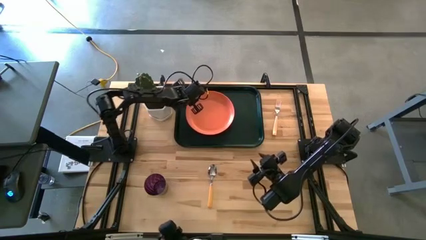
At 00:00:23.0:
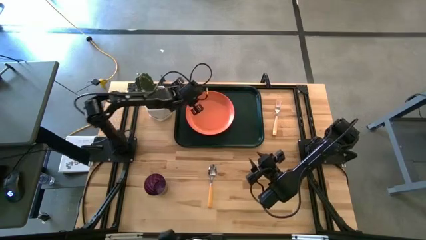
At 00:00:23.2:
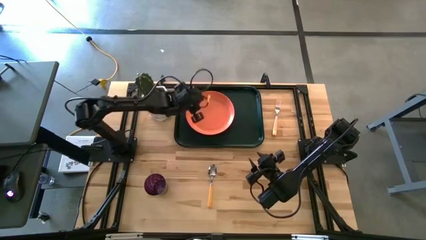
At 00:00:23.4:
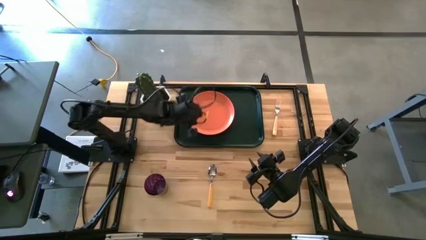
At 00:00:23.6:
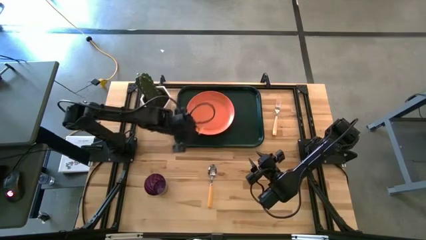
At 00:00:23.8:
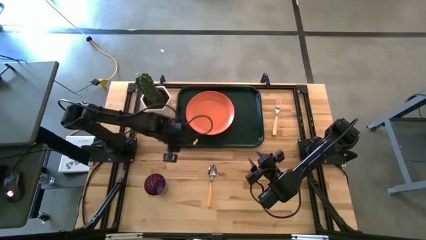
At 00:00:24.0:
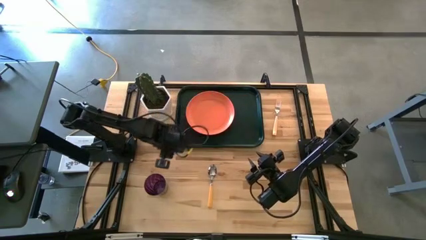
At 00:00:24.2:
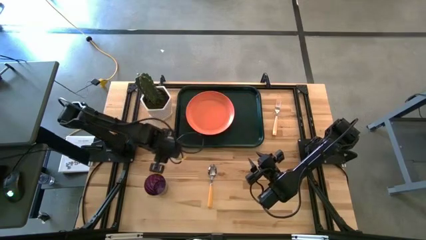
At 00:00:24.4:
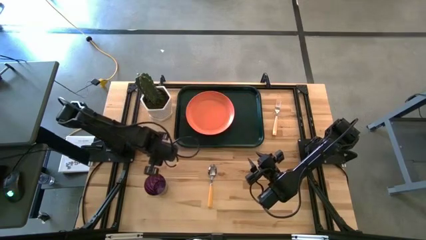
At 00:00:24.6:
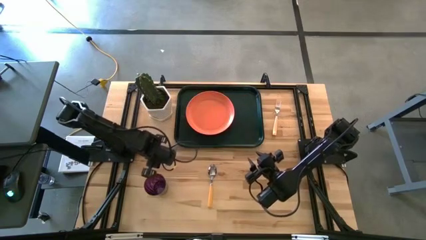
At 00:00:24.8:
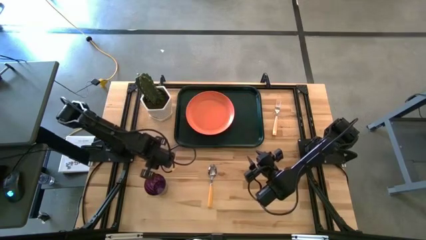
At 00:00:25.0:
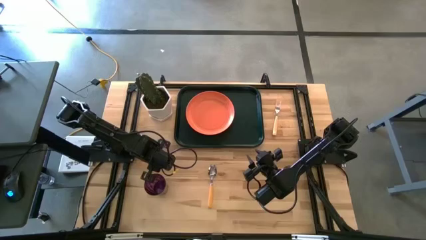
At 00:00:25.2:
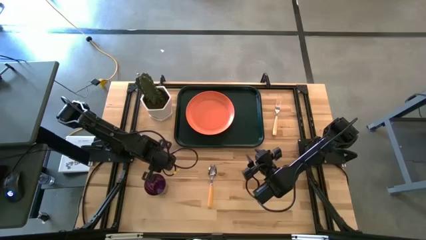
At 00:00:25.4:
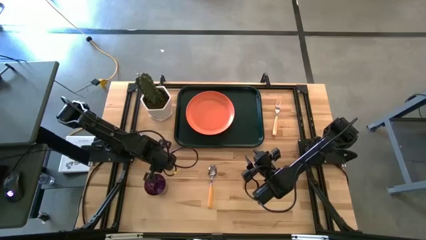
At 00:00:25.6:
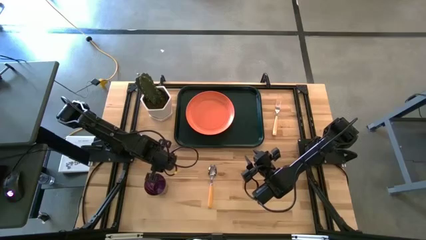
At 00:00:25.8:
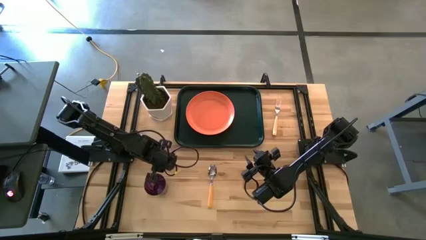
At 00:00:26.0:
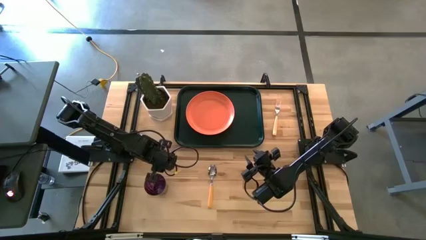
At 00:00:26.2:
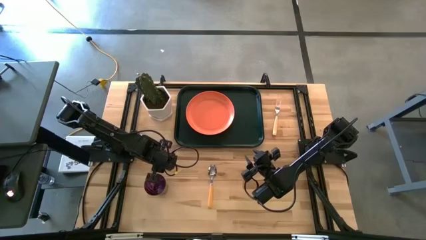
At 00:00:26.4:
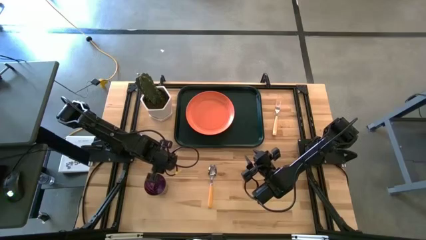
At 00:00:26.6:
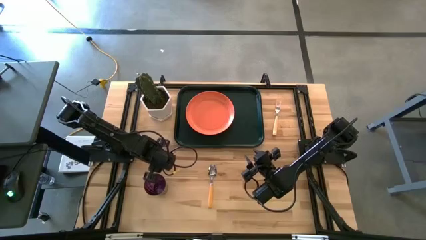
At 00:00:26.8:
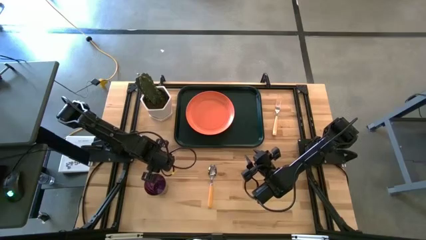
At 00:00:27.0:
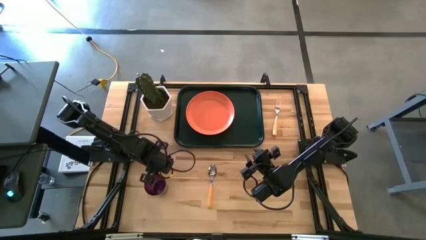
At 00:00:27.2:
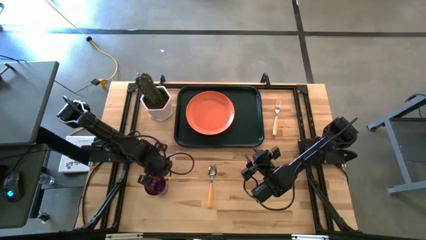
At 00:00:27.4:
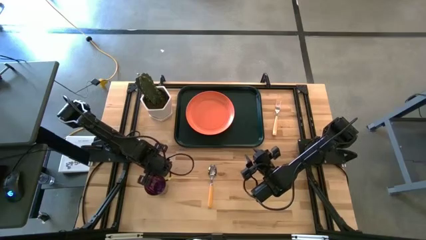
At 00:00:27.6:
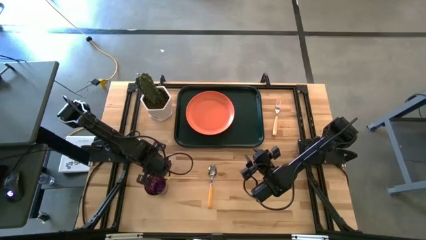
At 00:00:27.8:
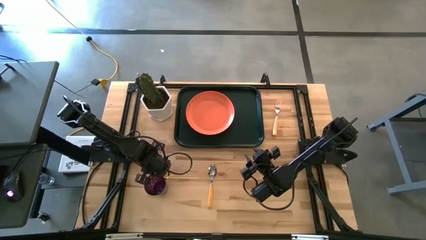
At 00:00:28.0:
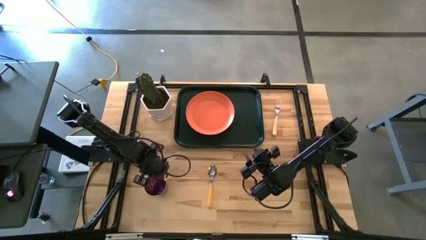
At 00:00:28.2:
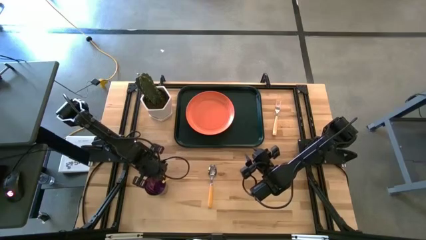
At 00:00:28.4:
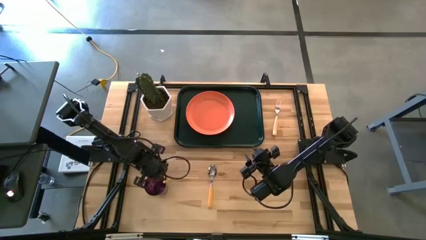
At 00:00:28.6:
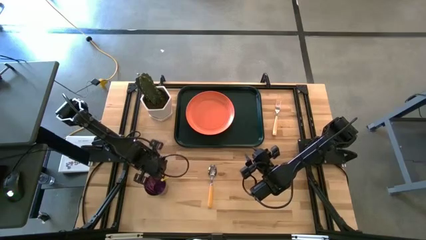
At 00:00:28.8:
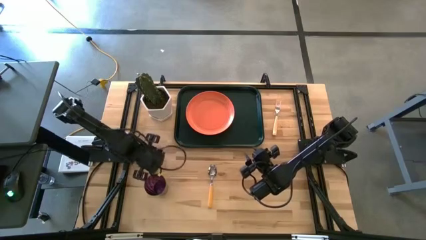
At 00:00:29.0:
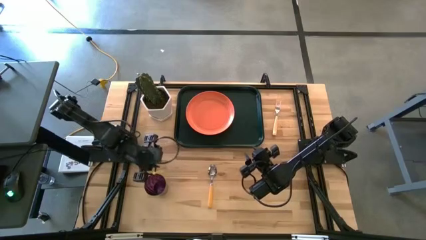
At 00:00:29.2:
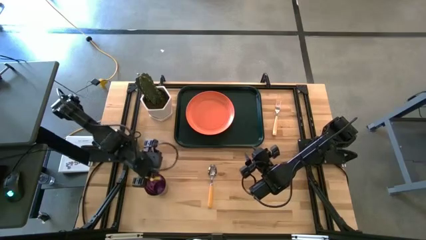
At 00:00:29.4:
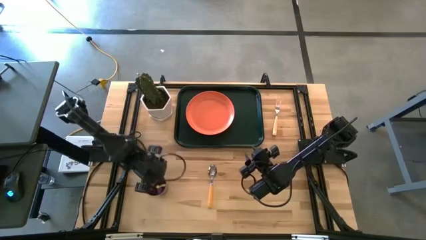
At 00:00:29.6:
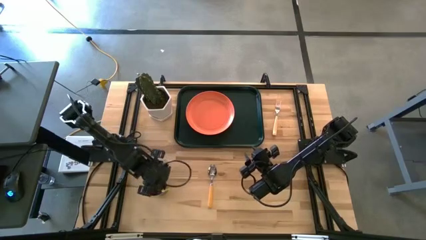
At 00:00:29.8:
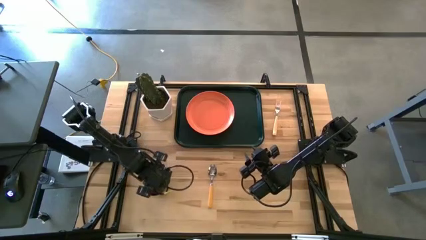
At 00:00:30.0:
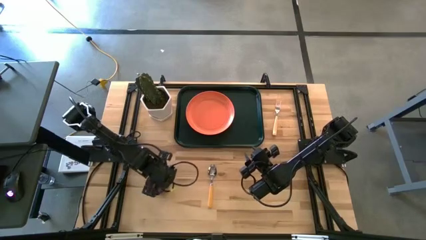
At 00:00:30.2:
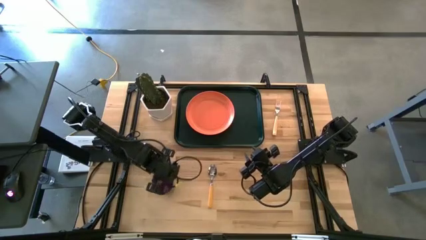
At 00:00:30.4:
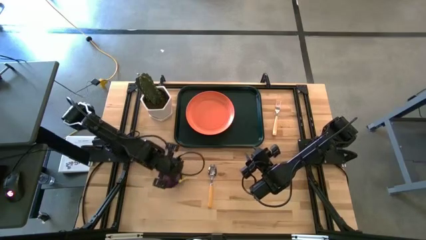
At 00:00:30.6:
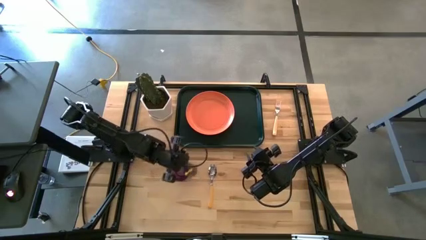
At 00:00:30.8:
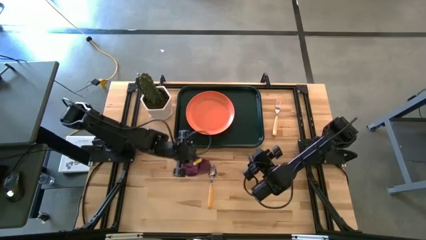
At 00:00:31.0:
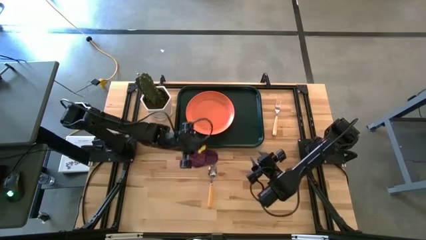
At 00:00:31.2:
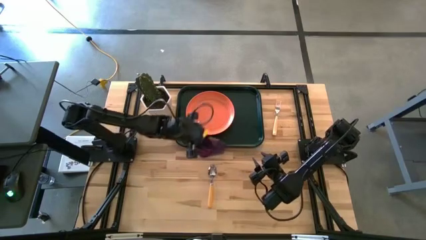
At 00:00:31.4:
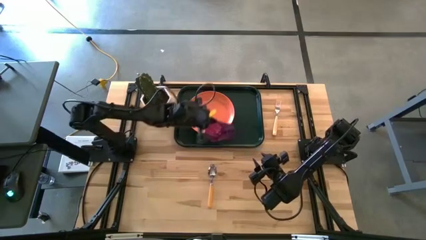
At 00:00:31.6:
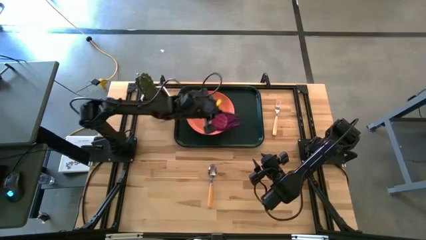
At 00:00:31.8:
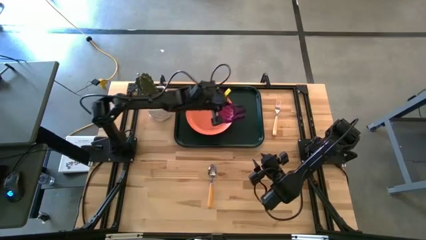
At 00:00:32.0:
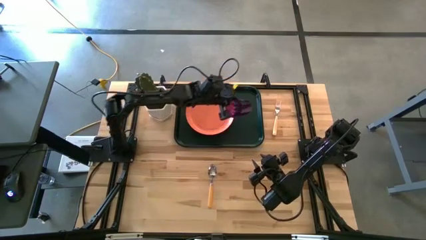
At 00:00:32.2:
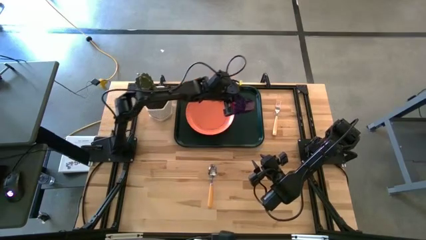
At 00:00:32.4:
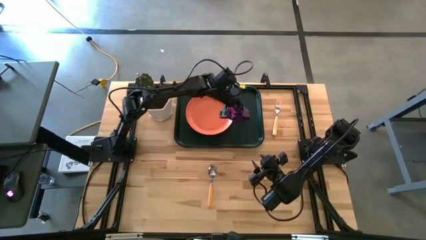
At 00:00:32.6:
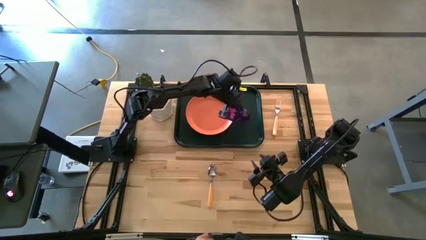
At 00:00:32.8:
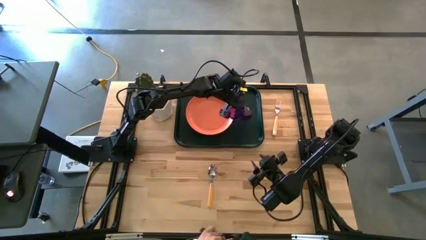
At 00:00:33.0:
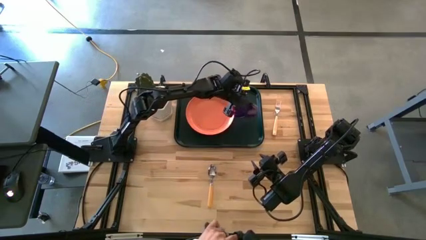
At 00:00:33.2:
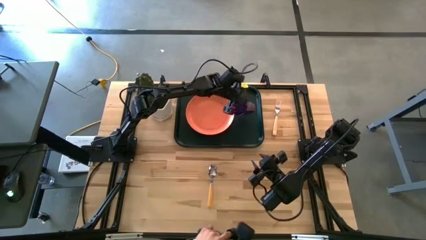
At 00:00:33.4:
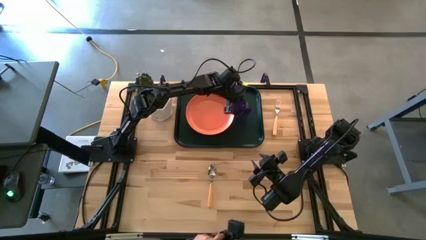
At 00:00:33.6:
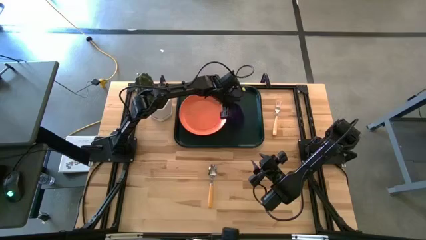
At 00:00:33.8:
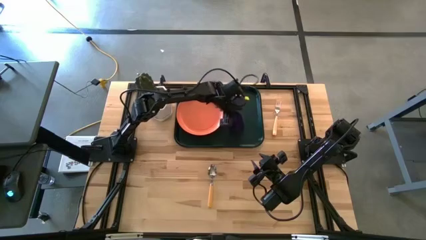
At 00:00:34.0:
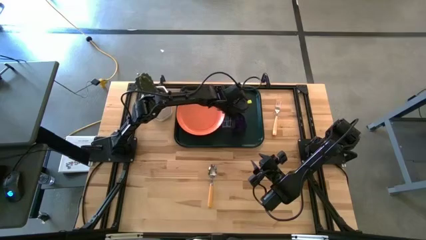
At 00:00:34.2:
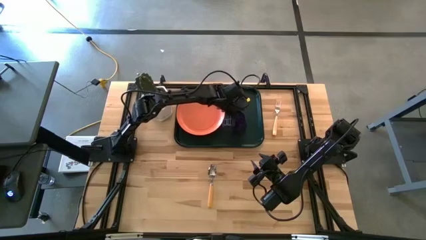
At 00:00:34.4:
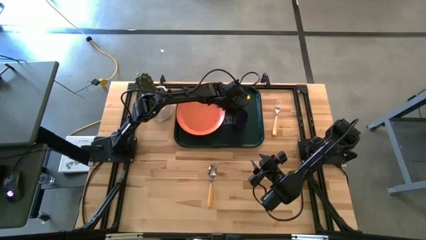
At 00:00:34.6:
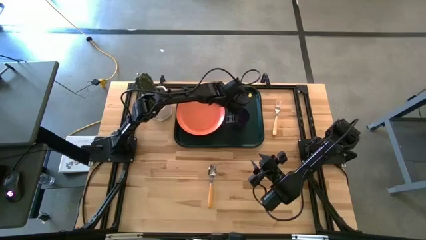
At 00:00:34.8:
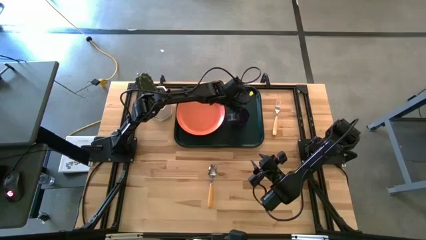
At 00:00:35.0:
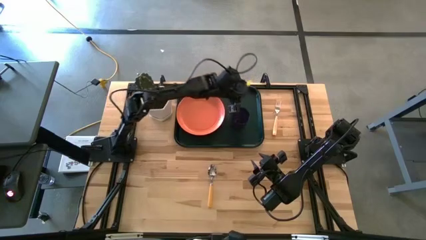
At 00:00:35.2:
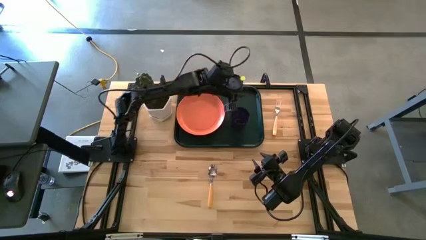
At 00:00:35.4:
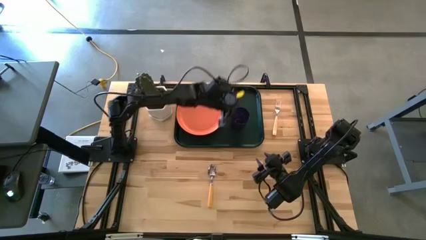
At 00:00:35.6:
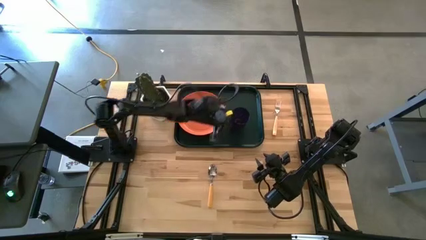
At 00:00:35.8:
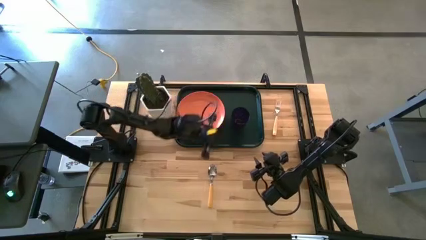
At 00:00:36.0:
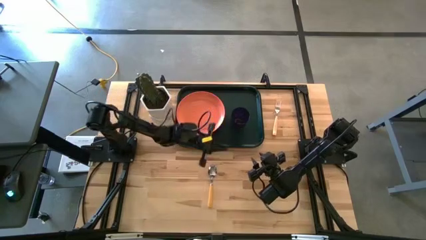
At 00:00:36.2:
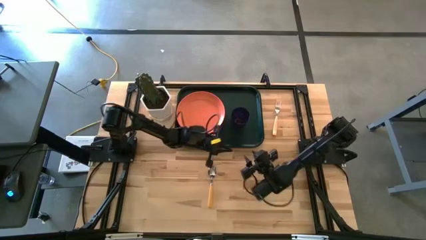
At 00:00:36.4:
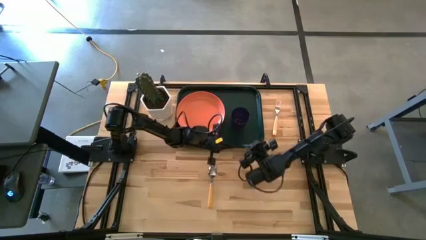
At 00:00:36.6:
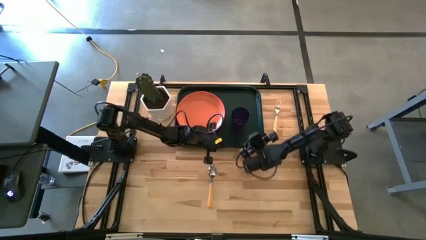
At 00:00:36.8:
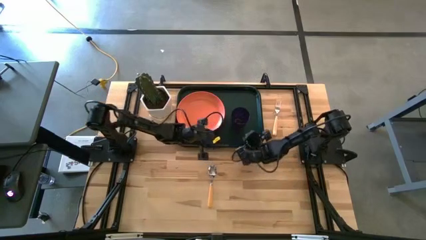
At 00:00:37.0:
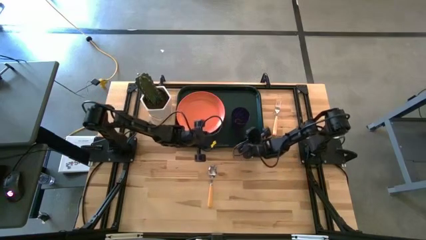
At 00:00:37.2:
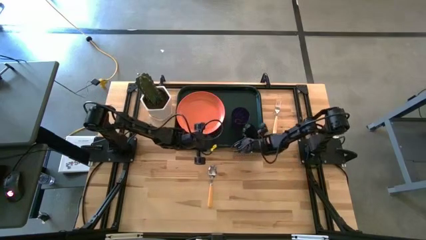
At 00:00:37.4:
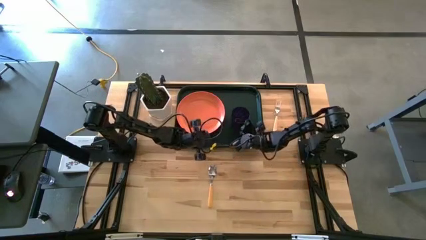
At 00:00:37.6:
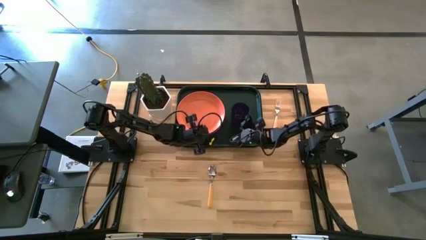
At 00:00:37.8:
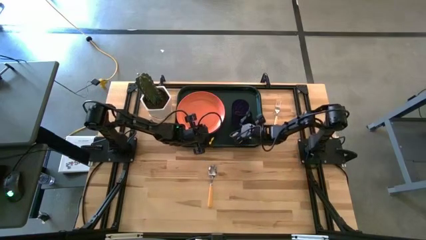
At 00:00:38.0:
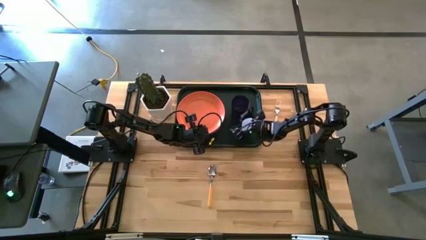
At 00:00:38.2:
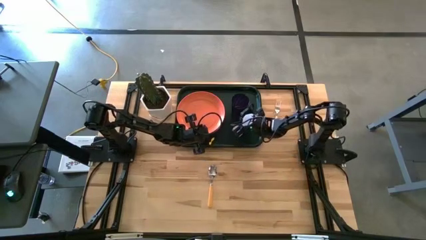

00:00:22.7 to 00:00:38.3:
Task: Pick and place plate/cup/fork/spoon on tray
Put the violet cup to the right of the orange plate on the dark green tray

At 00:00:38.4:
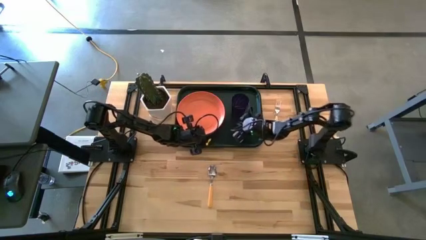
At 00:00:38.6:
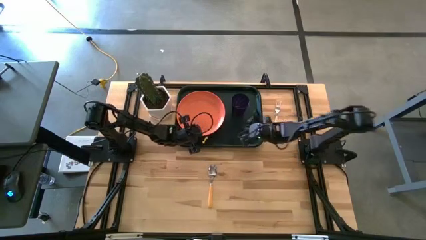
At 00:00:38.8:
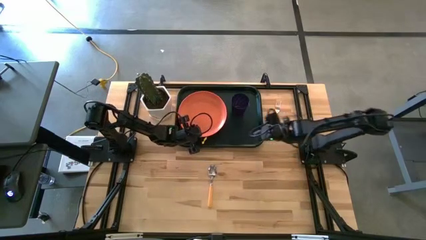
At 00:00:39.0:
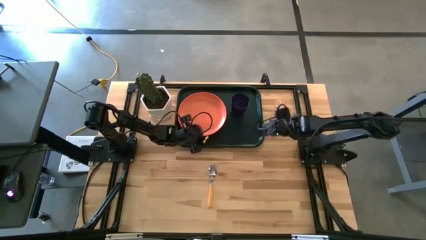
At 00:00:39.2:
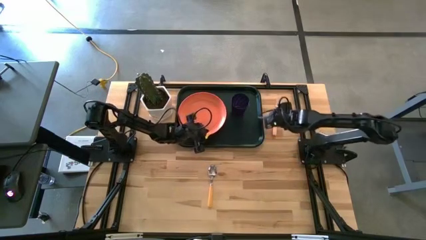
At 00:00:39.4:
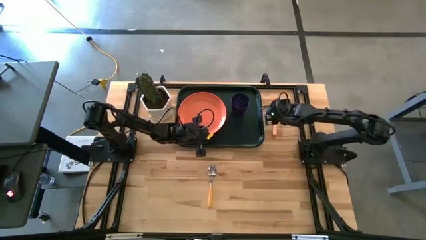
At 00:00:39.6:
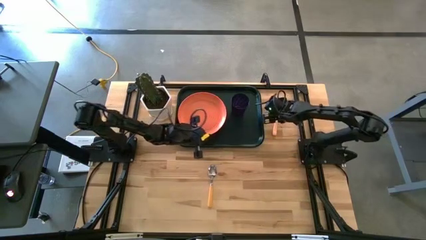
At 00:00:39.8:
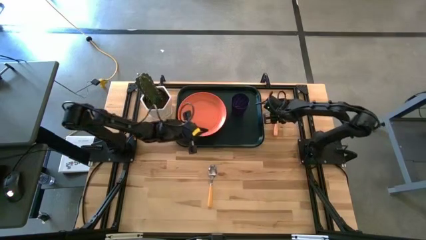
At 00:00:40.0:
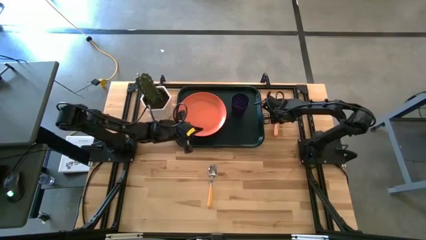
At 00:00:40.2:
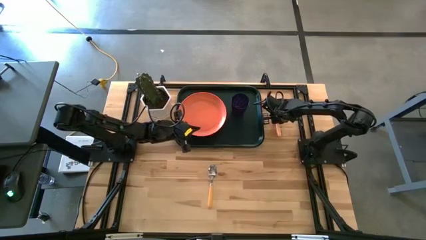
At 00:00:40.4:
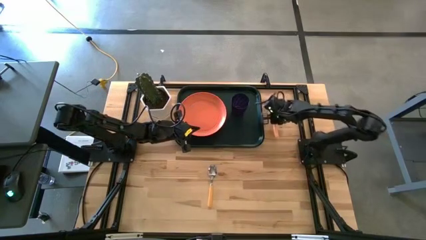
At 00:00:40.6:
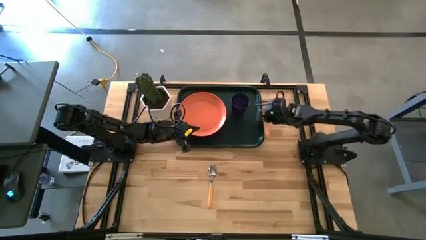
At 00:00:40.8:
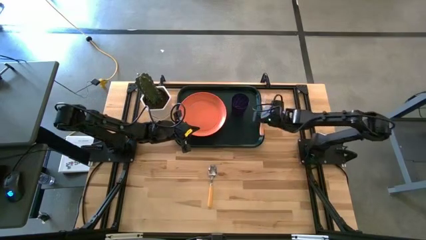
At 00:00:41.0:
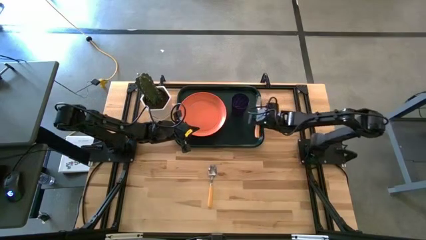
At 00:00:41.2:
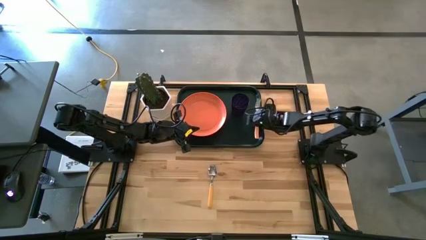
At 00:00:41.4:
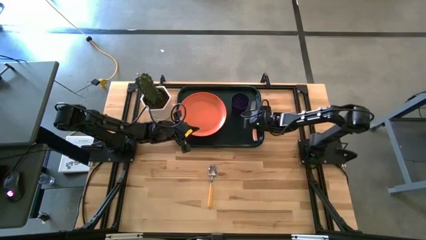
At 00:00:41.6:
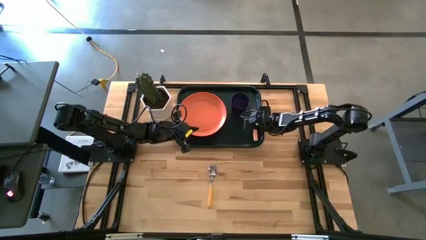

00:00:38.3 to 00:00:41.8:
Put the orange fork to the right of the violet cup on the dark green tray
